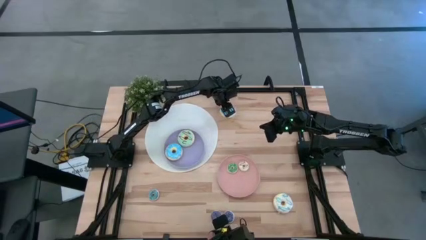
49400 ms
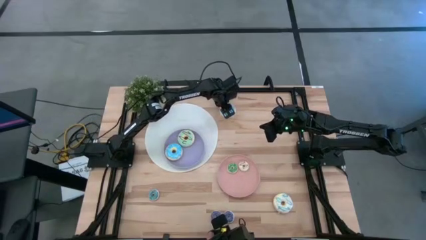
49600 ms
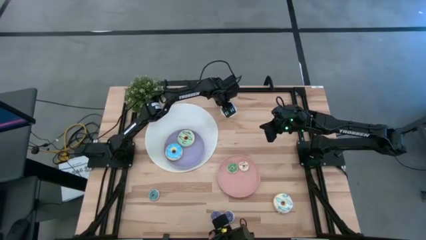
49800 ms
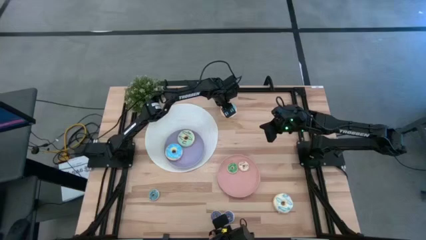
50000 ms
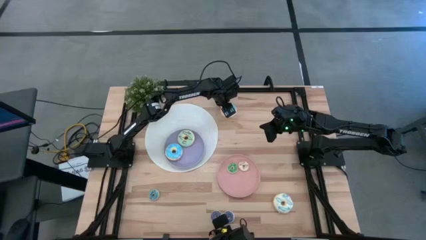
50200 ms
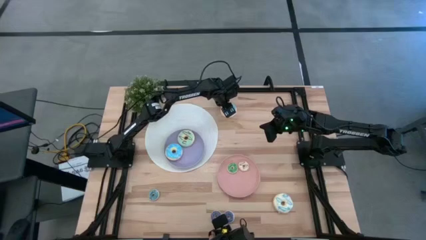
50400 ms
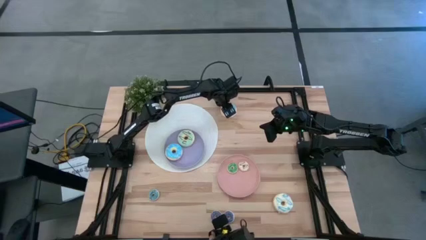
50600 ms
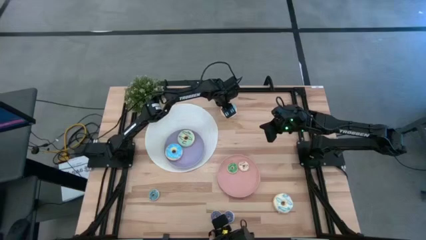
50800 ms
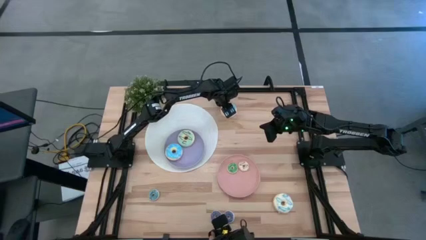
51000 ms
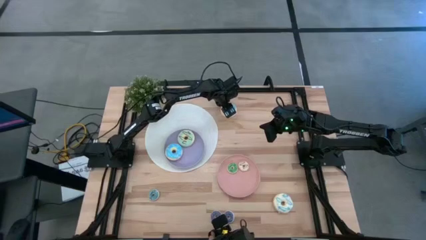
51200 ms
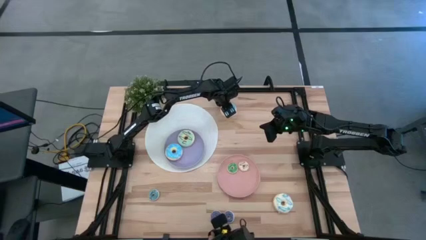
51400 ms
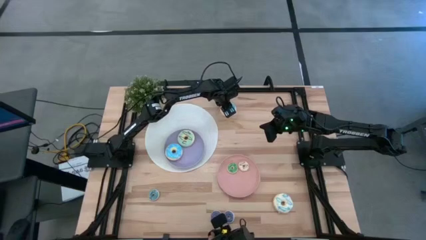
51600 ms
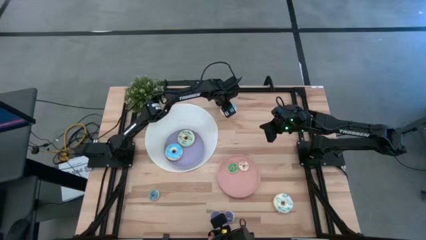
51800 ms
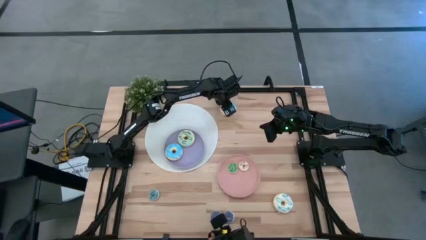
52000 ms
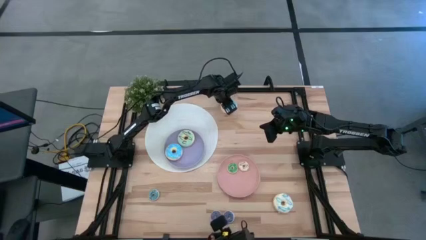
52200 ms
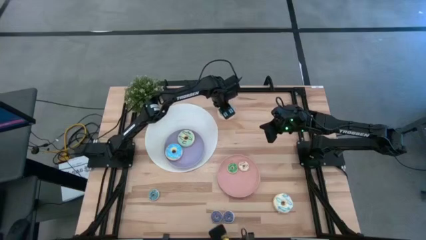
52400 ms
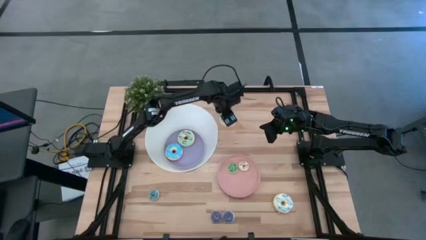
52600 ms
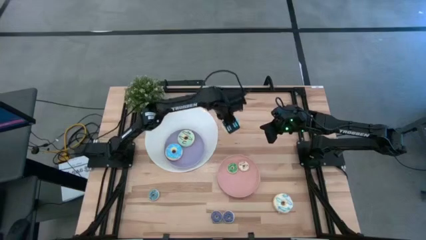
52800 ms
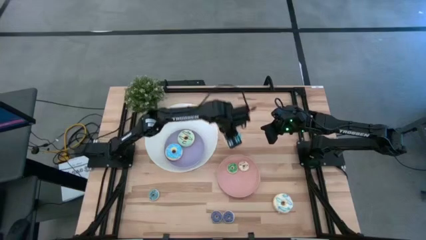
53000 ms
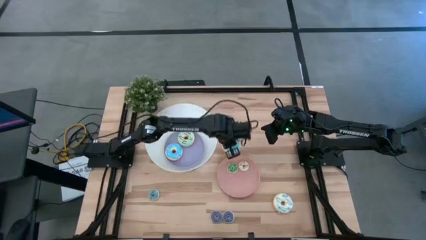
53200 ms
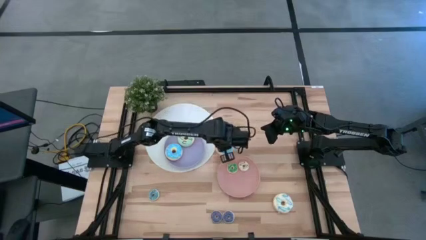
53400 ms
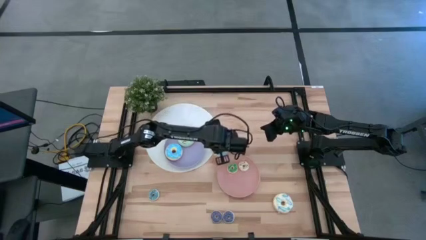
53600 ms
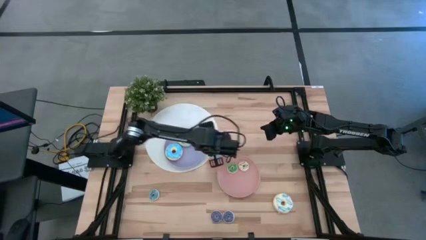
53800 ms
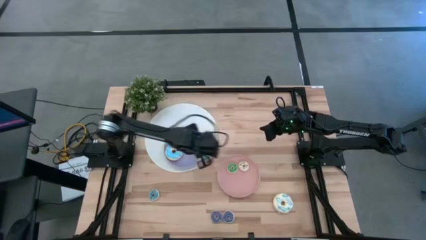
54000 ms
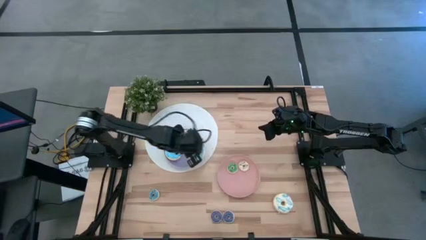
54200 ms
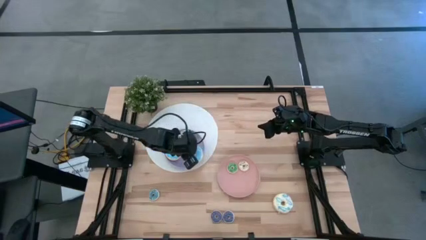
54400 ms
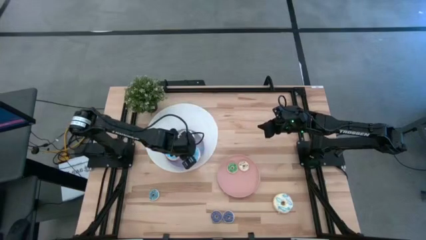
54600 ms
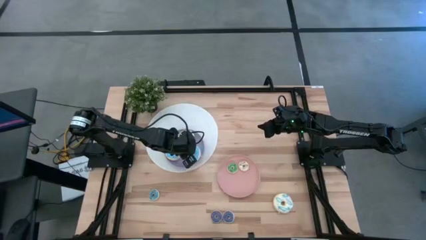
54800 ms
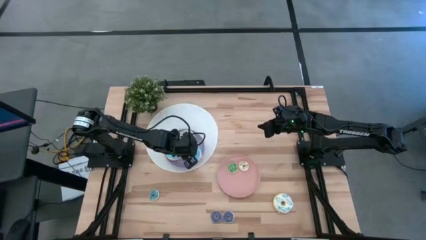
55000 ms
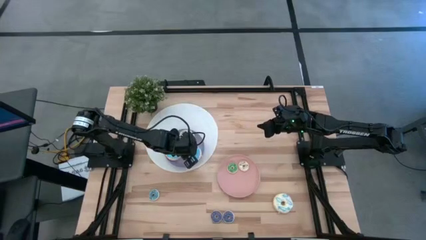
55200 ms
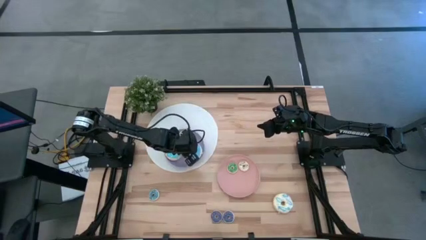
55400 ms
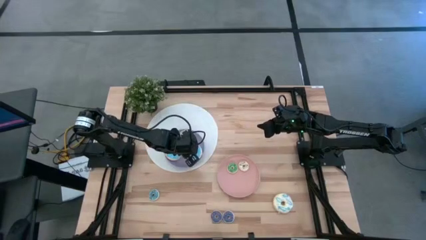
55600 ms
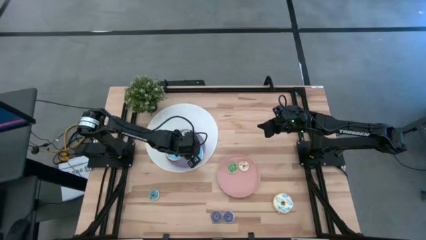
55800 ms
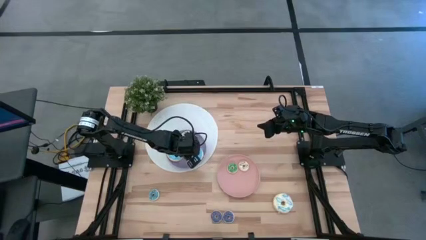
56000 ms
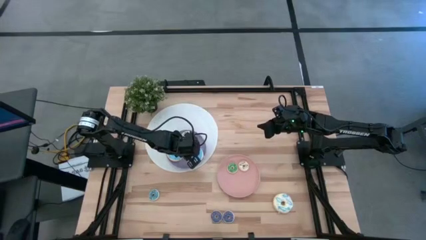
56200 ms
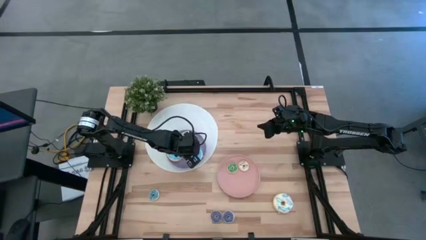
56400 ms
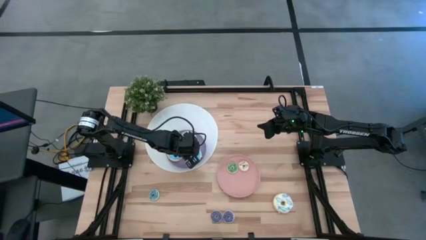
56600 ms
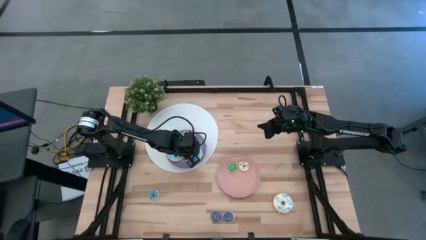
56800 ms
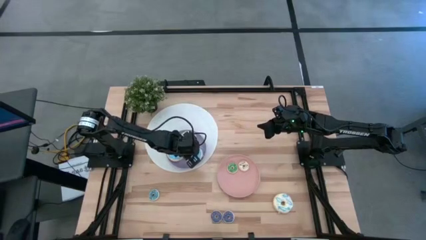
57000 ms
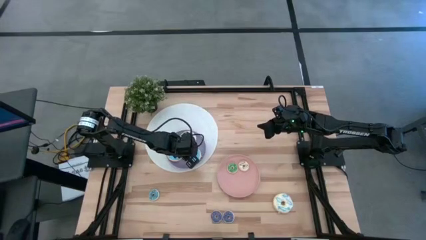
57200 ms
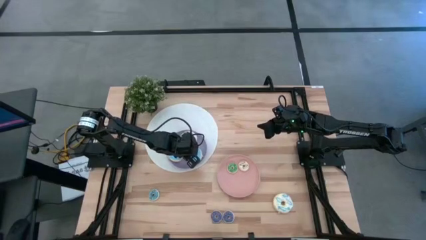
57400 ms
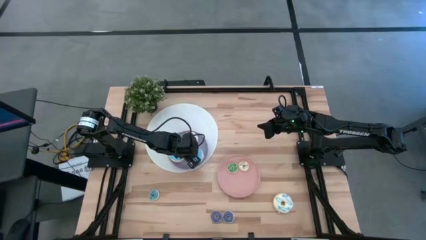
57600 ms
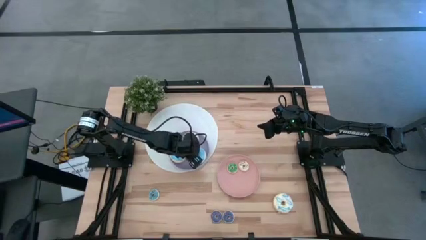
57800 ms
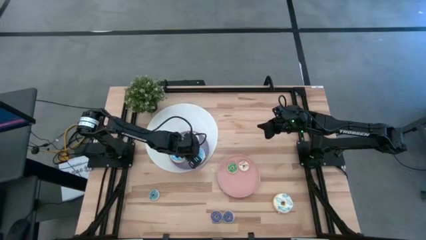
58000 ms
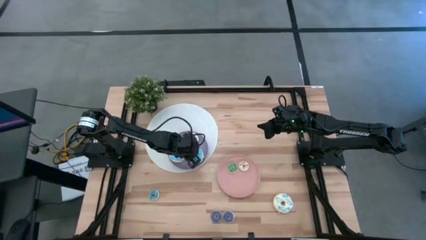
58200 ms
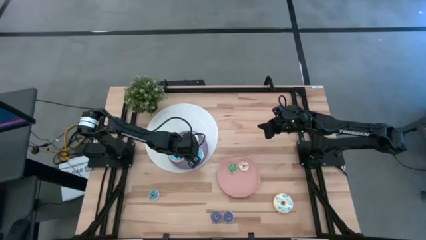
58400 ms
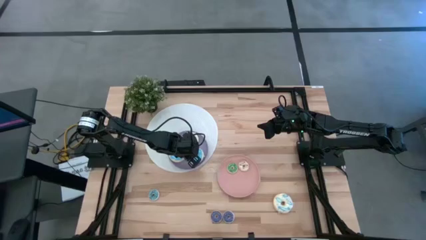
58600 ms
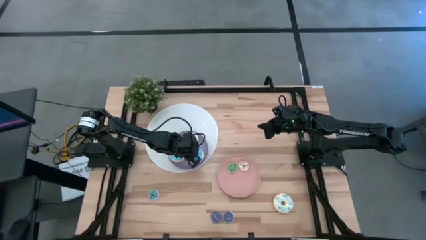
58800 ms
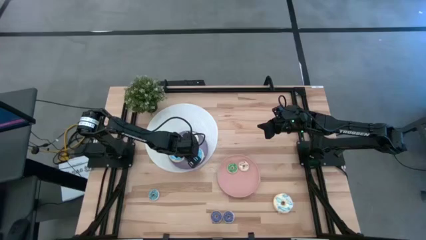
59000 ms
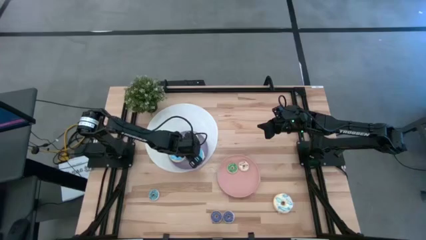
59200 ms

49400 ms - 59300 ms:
Task: Pick & Place donuts
Put the big light blue donut on the purple plate

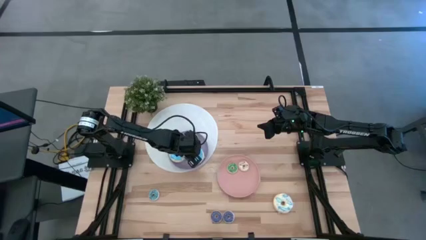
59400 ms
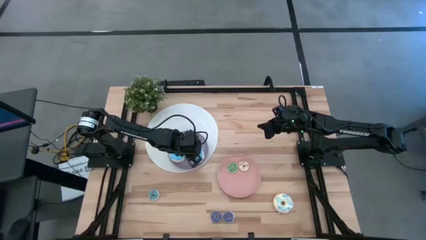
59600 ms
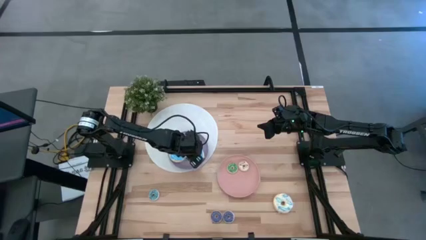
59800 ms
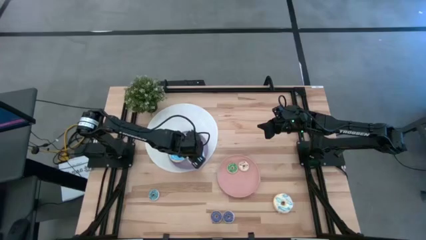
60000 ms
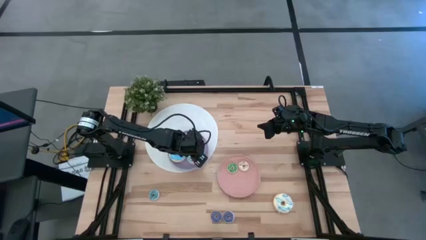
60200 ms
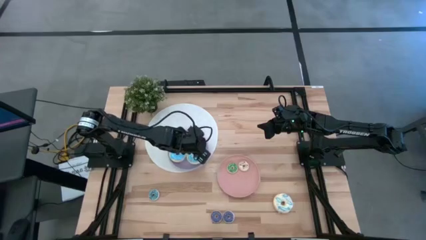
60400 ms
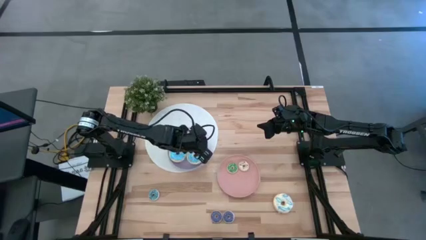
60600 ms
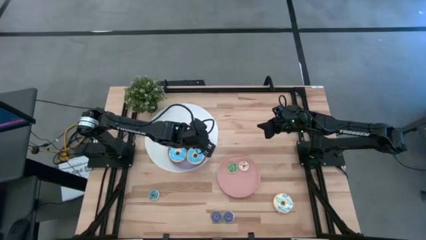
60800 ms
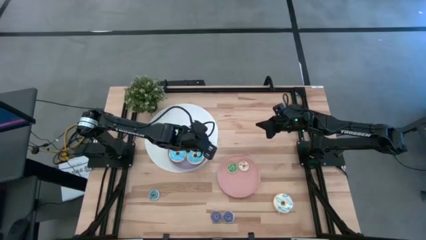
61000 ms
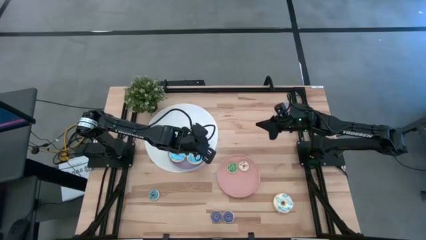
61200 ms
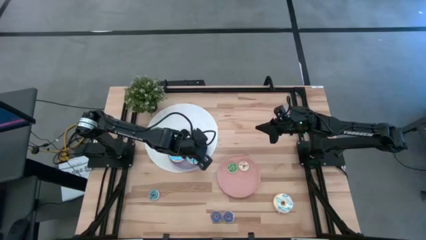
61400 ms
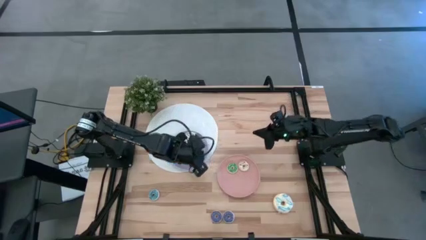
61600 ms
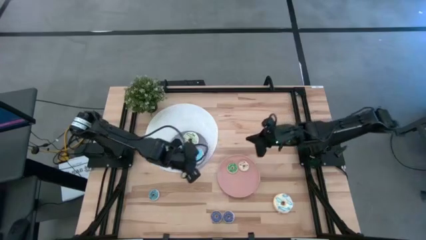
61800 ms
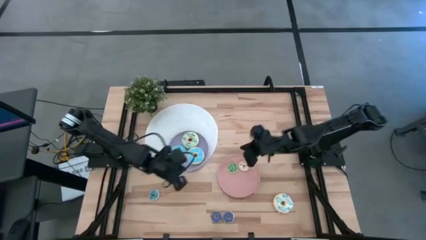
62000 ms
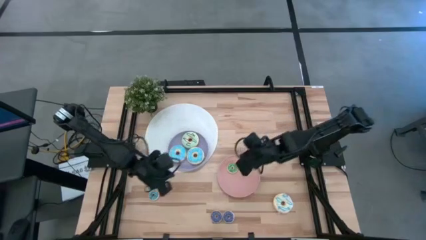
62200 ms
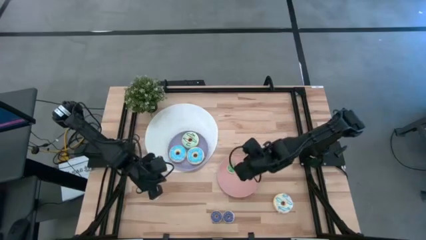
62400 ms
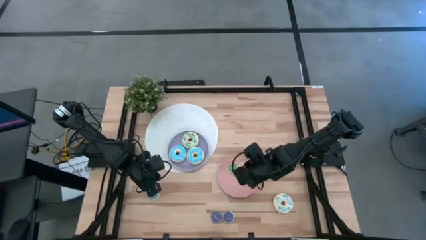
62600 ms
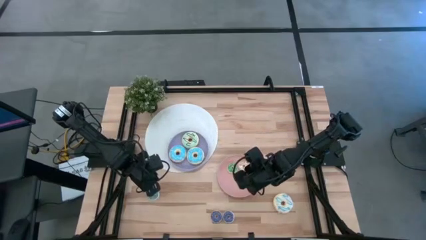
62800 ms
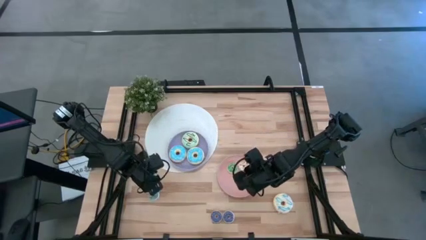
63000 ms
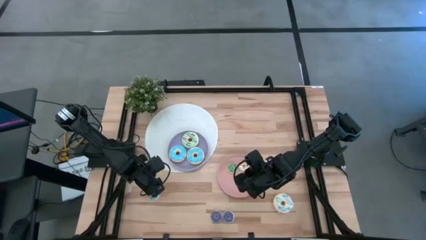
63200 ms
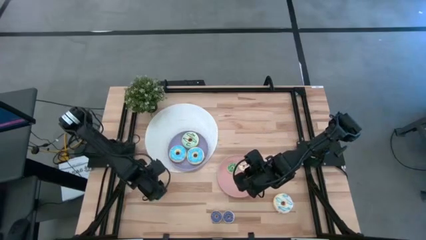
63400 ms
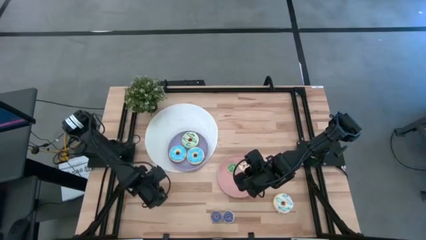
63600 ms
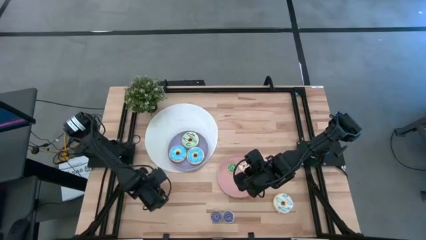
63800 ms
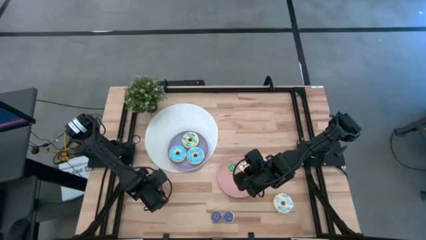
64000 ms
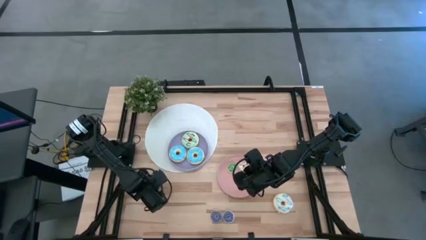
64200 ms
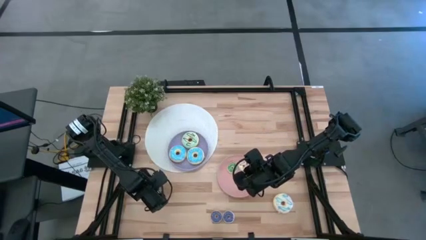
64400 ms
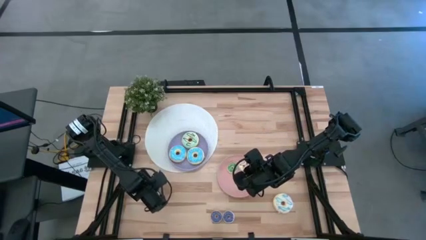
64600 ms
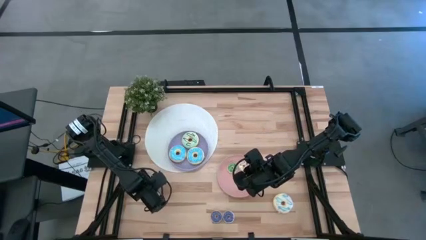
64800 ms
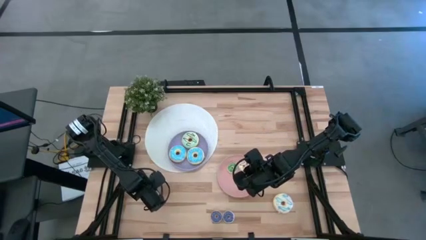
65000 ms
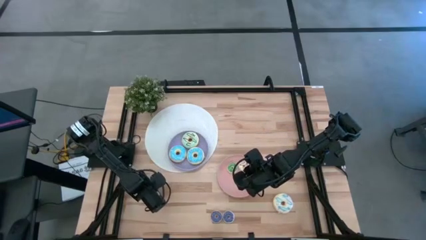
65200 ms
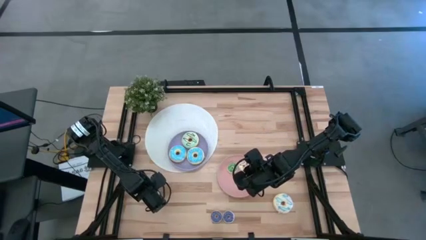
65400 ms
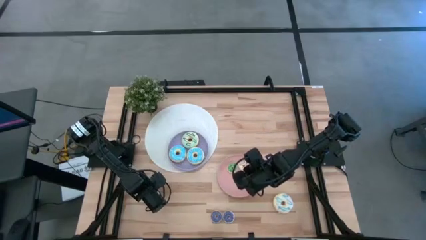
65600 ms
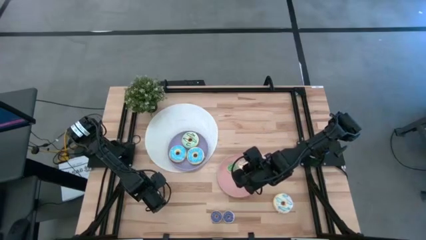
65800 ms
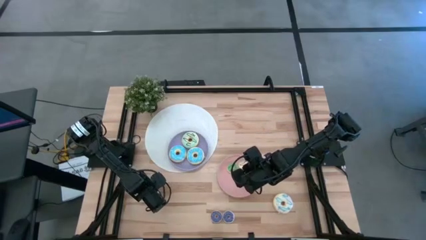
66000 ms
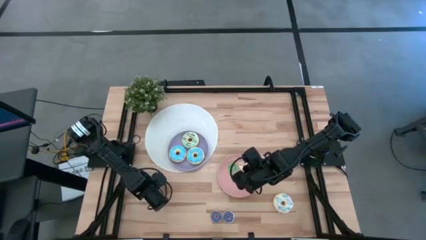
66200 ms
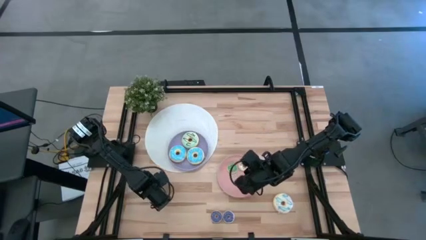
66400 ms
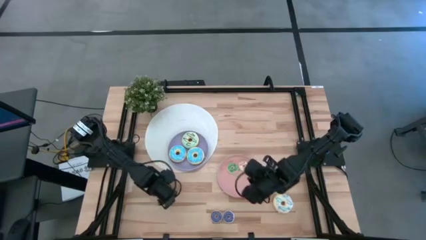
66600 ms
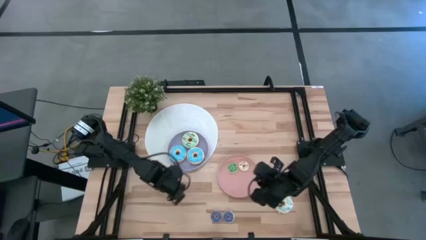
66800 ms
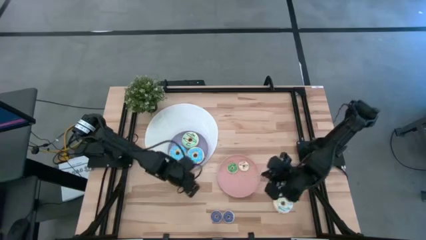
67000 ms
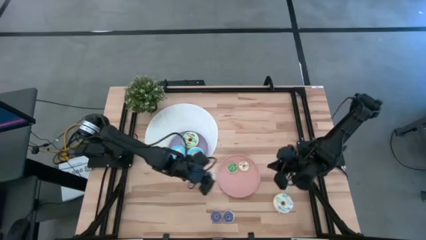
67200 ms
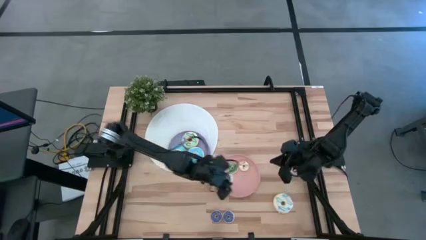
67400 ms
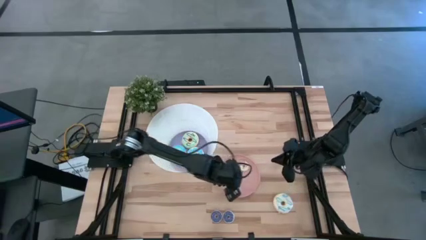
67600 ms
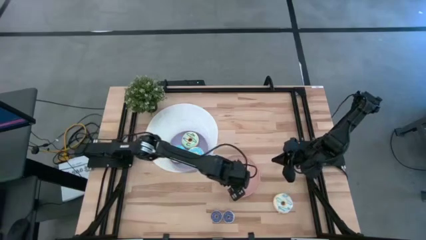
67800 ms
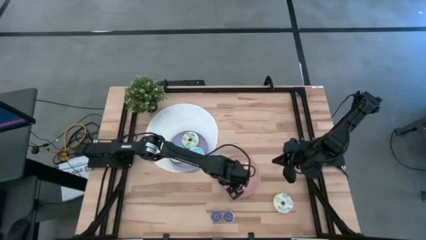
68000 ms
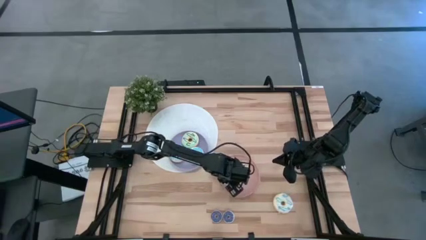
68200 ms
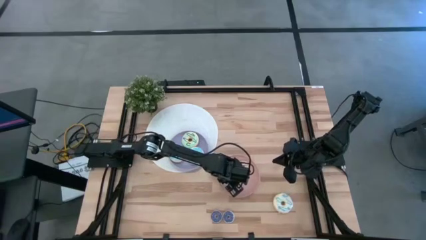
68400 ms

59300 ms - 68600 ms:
Put the small light blue donut on the pink plate
